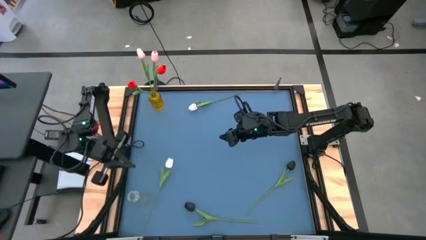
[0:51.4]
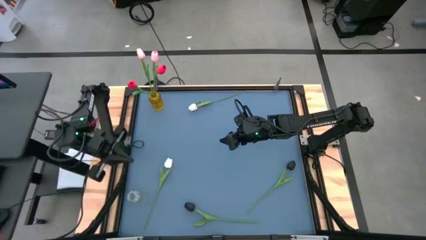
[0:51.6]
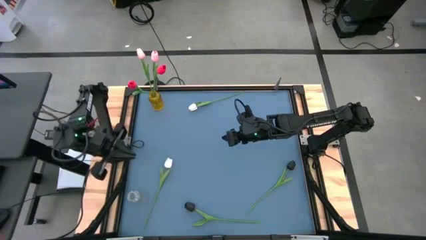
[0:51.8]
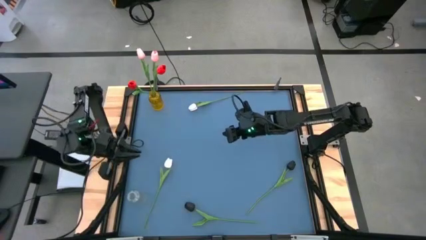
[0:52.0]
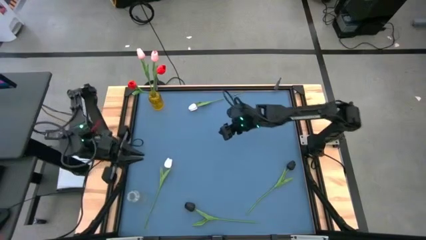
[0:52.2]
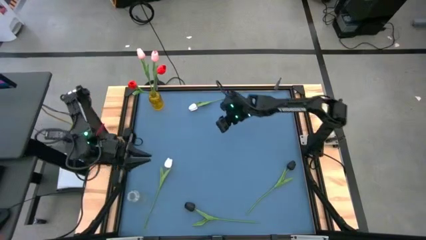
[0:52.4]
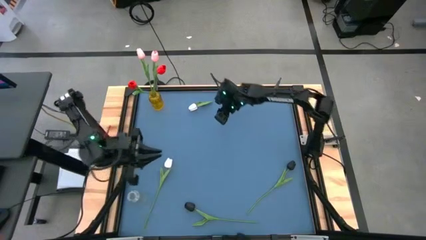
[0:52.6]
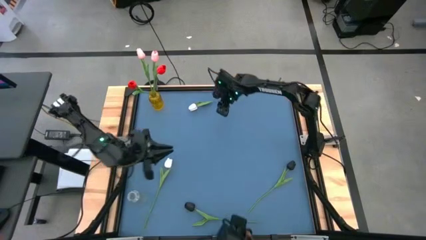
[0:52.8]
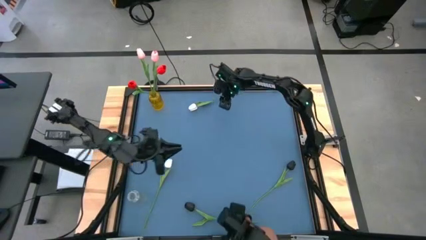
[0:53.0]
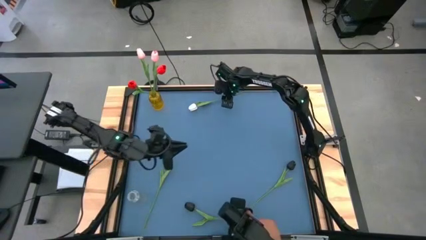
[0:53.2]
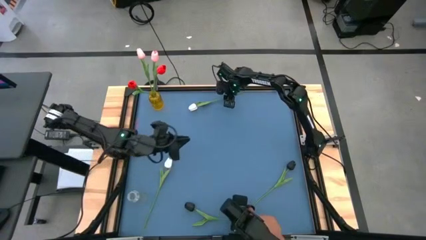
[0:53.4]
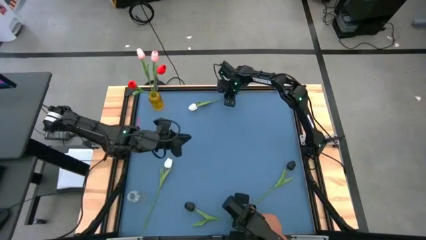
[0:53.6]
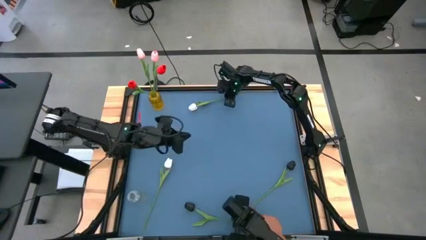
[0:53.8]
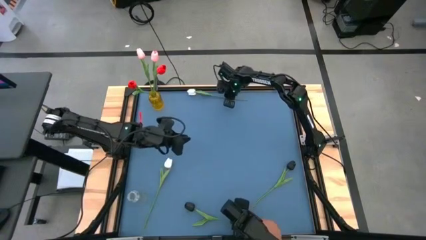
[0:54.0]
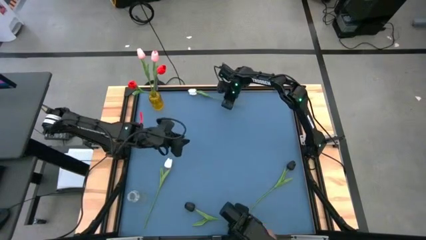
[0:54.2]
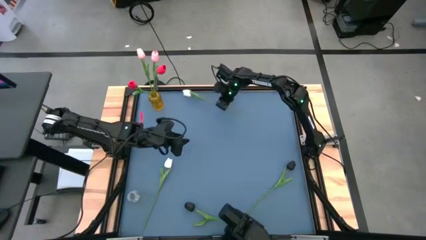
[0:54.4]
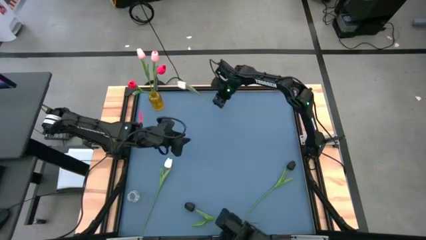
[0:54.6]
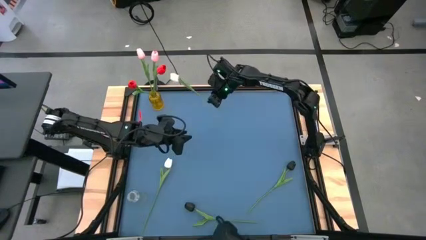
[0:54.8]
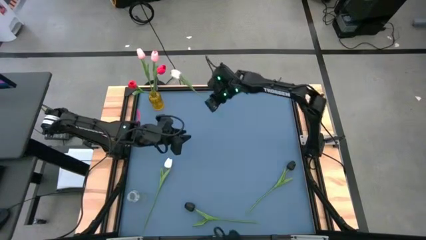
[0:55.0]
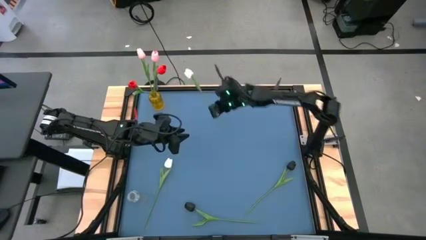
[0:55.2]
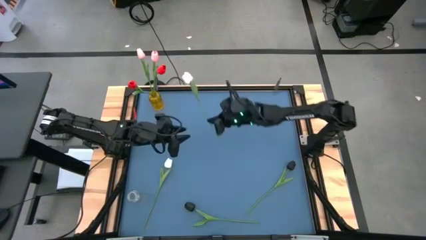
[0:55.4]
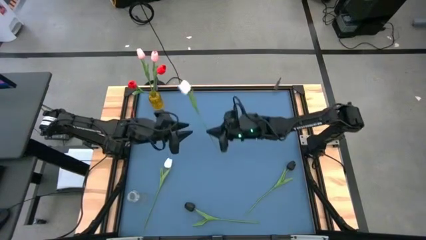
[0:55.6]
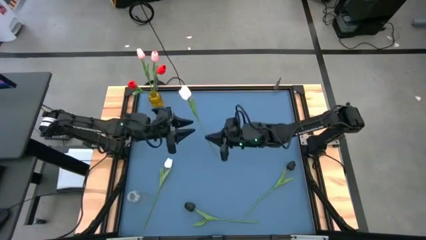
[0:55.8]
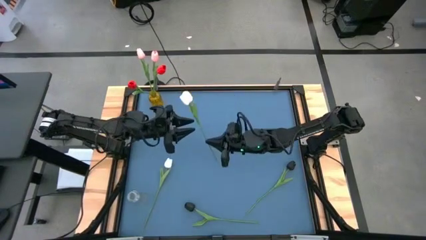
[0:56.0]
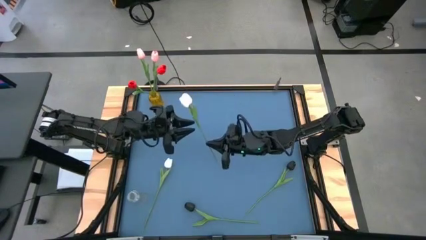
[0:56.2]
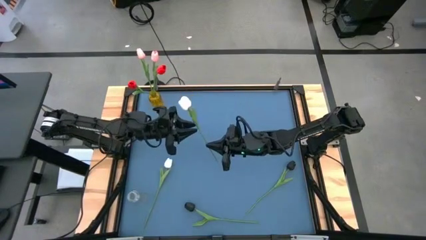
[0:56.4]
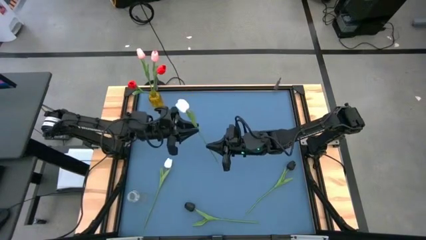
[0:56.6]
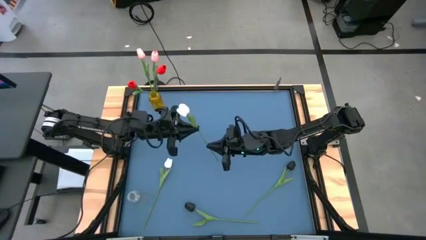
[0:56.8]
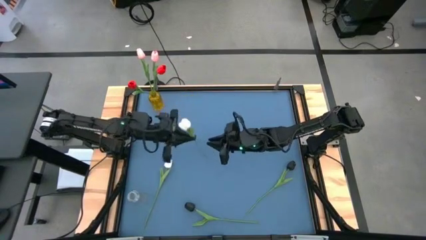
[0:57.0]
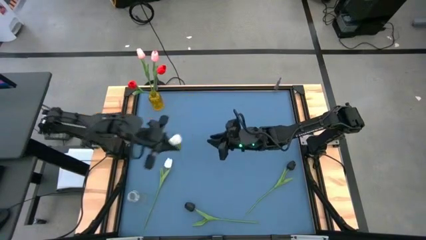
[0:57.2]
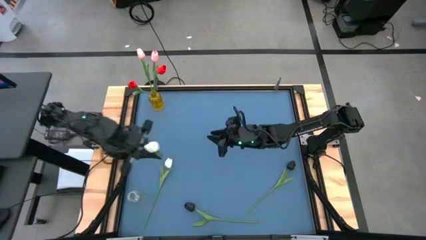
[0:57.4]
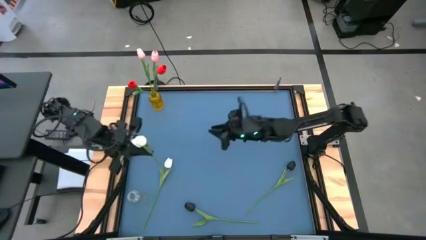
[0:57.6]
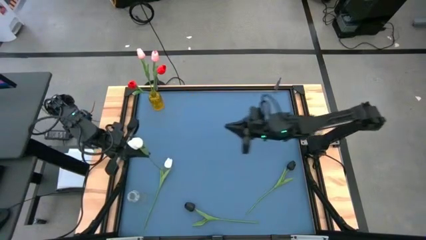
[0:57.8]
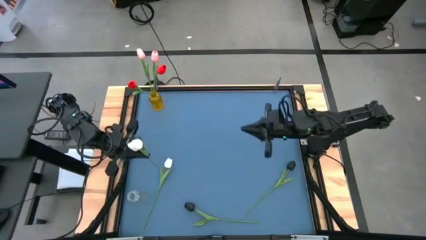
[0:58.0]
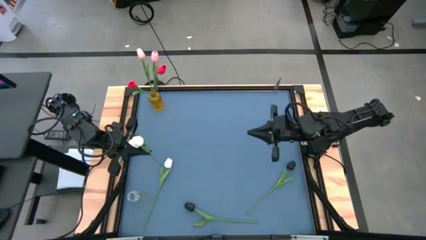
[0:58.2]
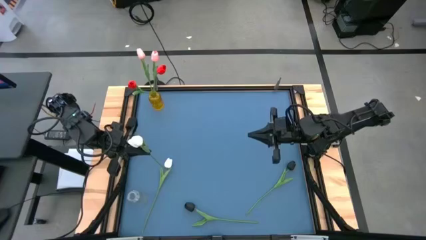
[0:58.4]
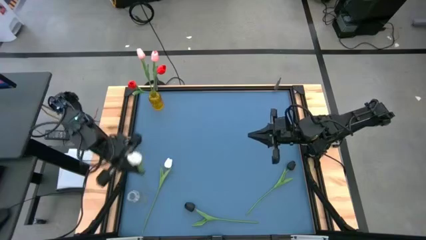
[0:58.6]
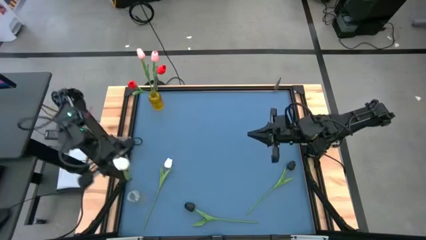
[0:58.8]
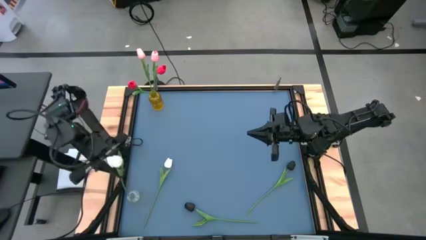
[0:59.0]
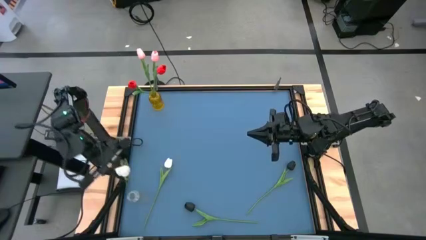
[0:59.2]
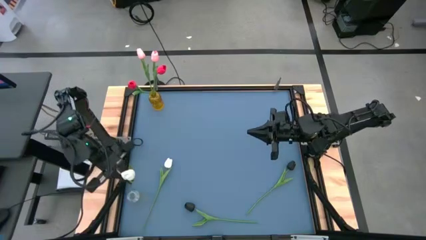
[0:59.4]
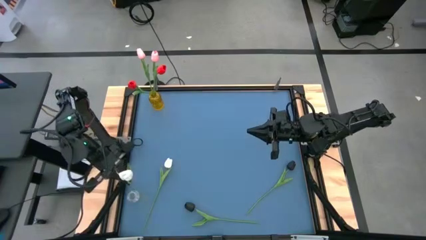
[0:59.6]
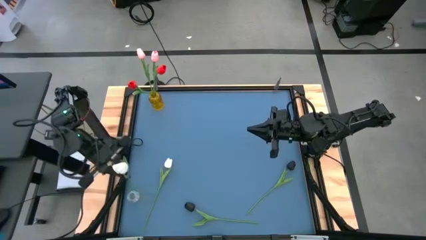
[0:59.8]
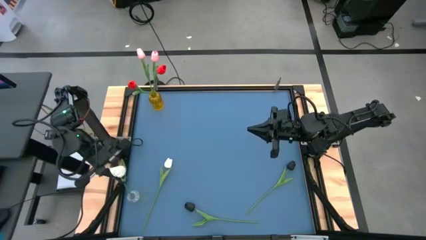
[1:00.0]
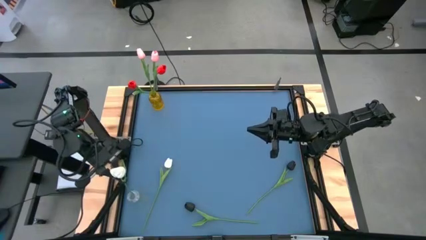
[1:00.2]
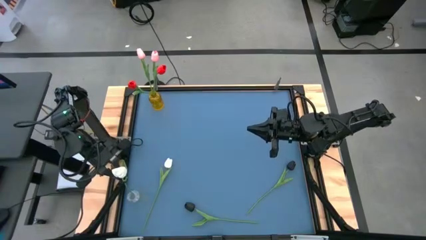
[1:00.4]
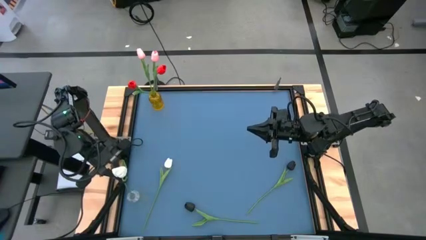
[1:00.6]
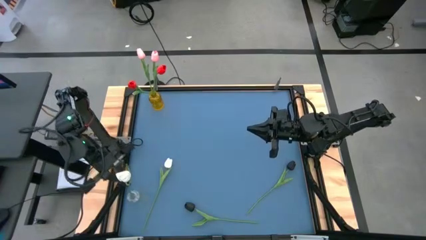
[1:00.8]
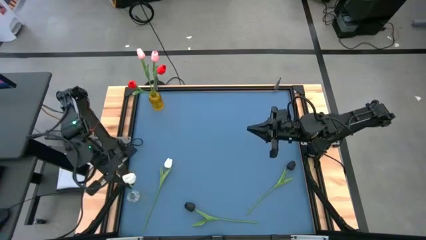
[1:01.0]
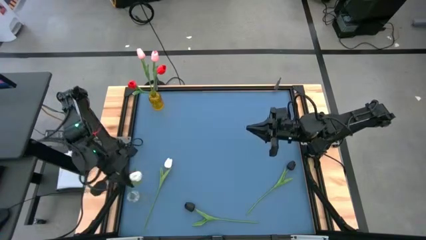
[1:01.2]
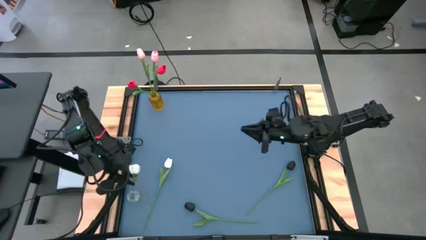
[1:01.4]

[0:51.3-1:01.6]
Task: Sort flowers into vase by color
Put the top white flower into the transparent vase

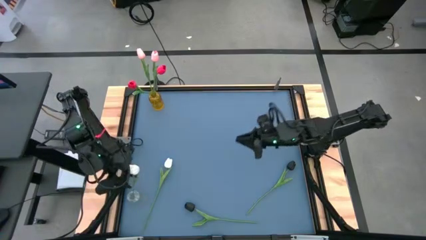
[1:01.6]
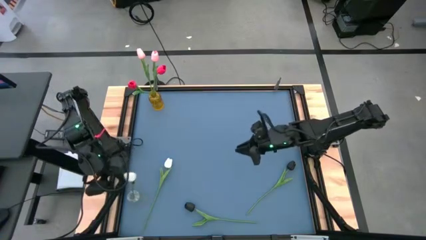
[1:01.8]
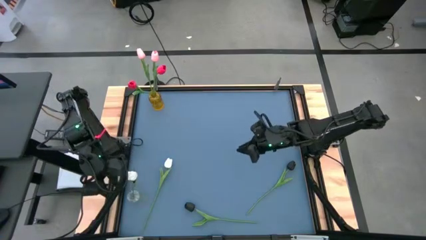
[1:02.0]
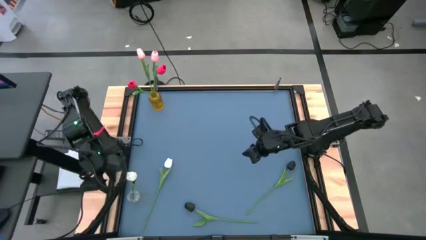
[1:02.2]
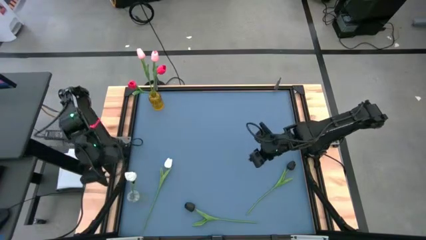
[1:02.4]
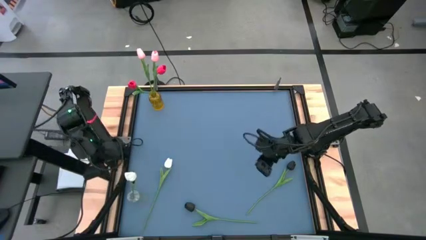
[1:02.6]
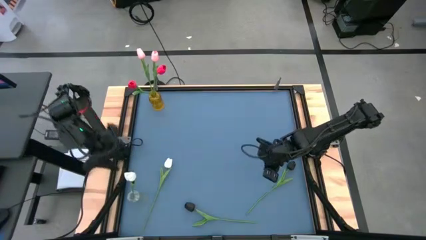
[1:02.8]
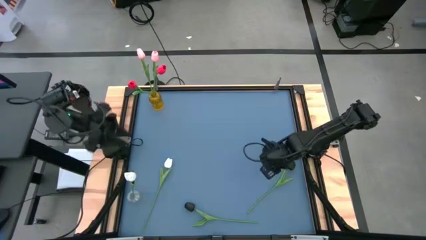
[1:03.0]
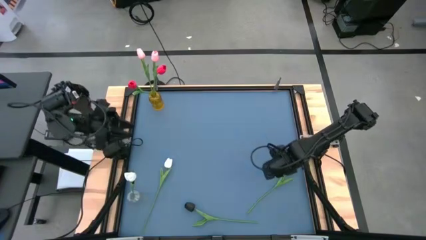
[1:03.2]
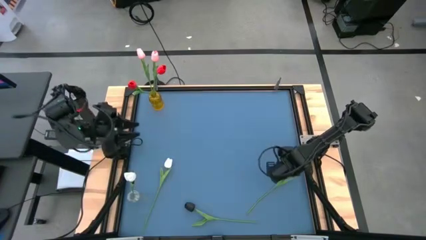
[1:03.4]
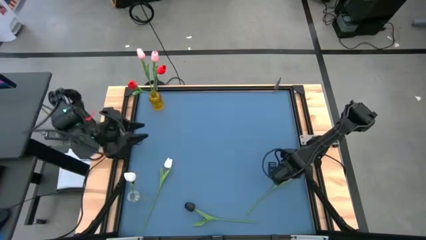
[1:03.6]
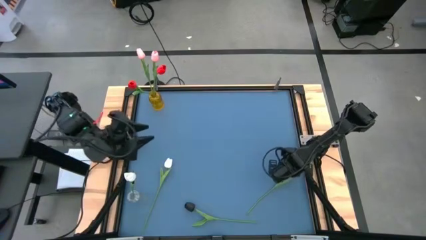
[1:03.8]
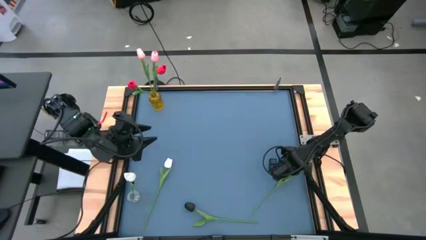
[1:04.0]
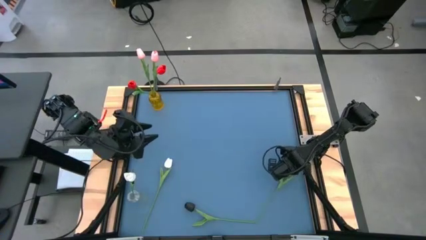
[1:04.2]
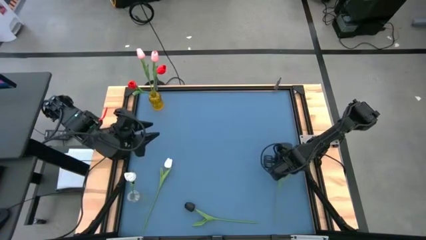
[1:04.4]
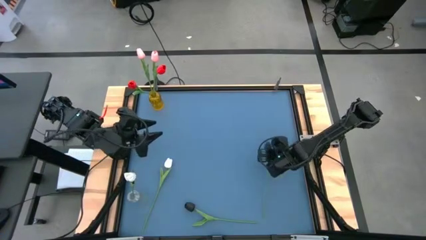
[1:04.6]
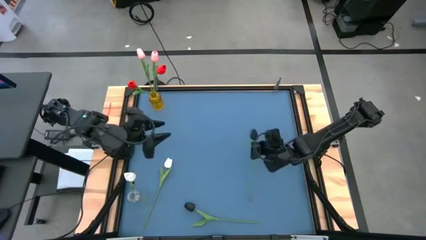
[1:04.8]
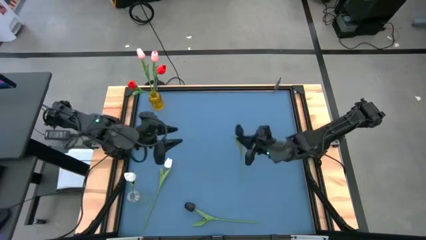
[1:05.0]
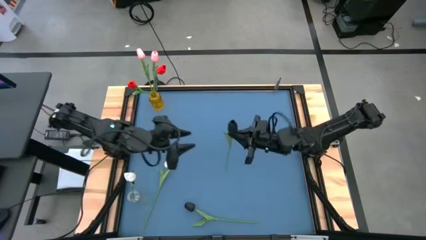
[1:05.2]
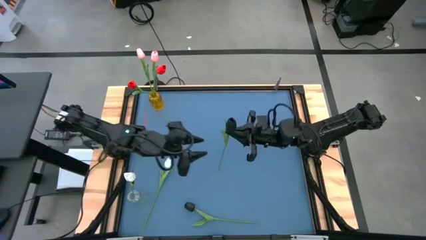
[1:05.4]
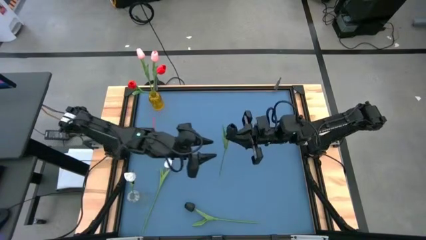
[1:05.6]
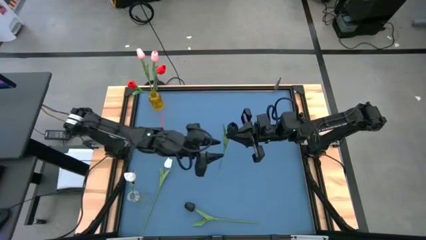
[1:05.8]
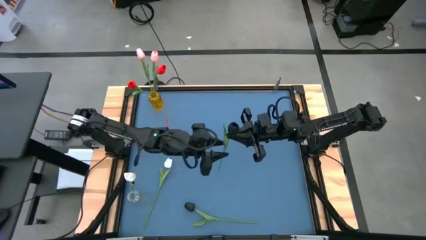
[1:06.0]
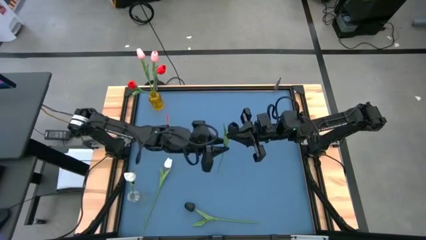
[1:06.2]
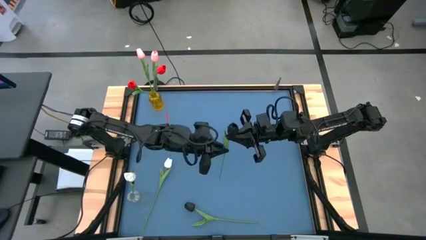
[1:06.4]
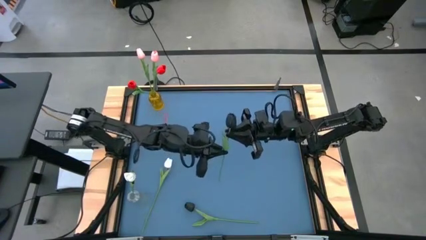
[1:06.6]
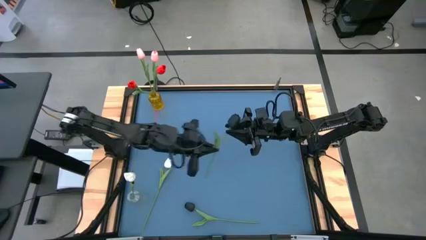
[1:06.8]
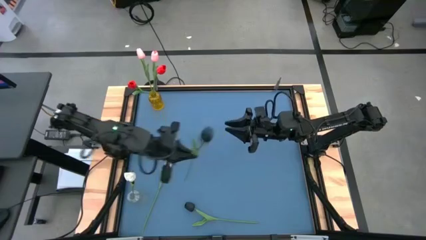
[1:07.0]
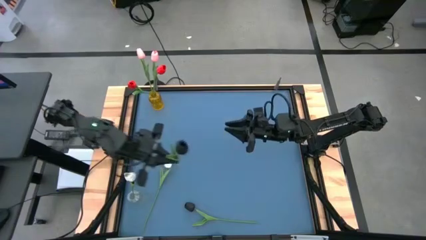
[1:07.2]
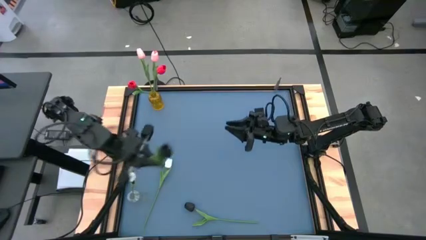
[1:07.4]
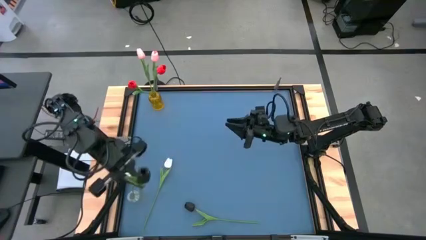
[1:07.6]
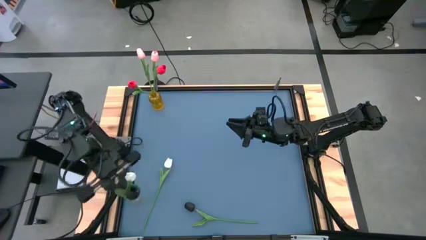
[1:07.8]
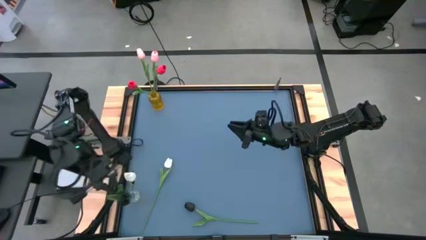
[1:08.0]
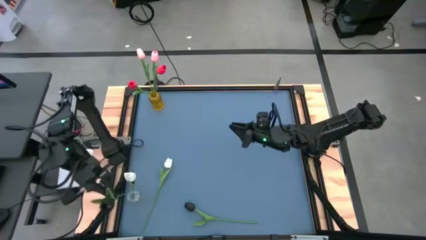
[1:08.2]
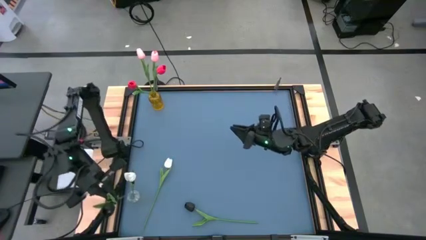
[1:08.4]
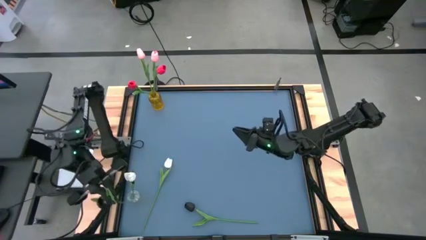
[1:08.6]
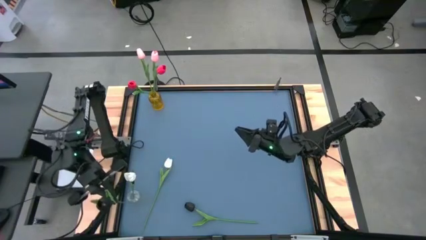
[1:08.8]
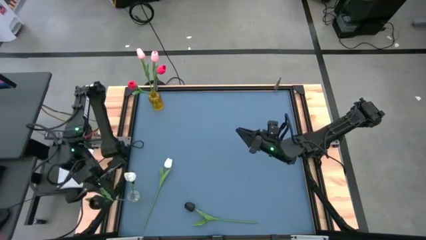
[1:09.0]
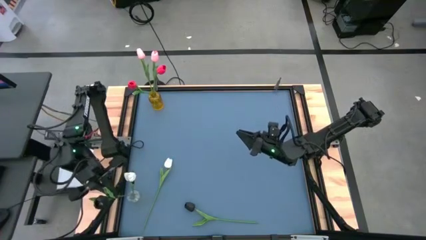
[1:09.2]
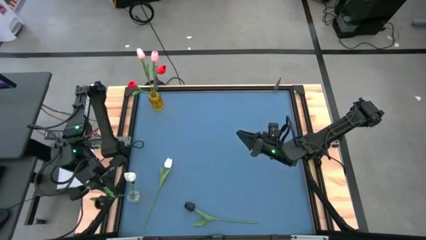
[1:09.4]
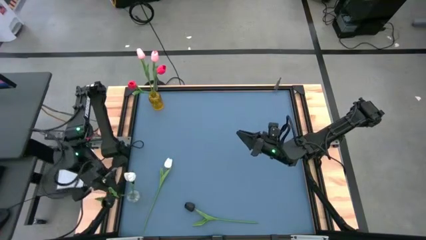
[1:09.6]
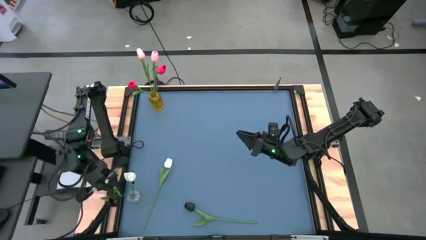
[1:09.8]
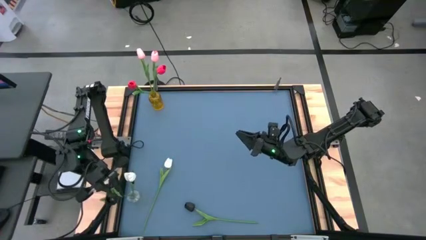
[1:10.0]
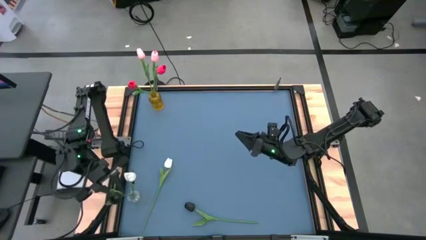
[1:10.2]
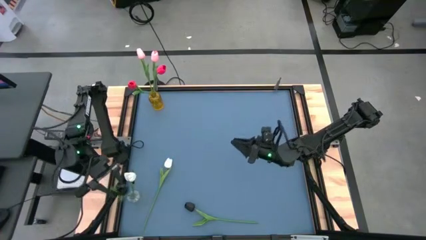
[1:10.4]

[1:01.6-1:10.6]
Put the top black flower into the transparent vase
